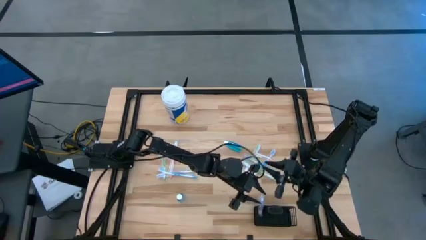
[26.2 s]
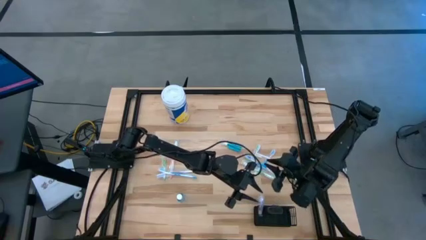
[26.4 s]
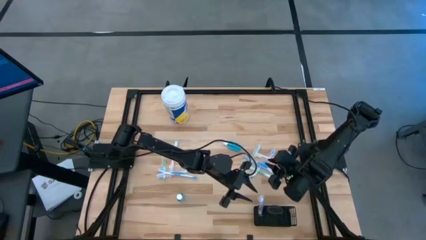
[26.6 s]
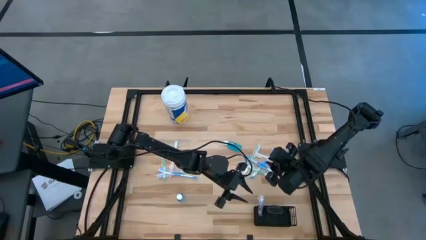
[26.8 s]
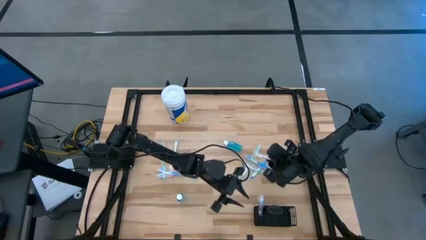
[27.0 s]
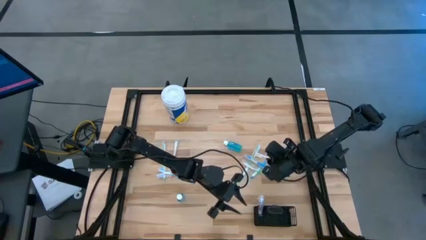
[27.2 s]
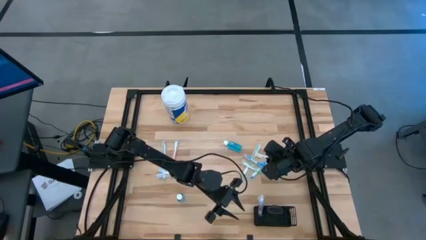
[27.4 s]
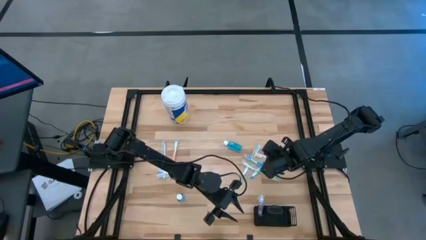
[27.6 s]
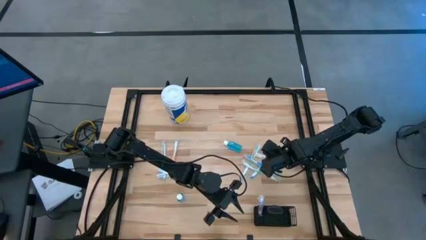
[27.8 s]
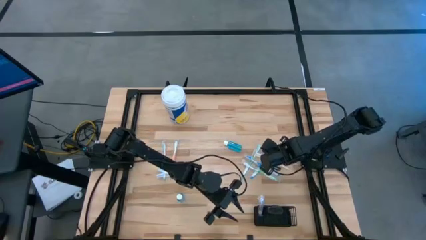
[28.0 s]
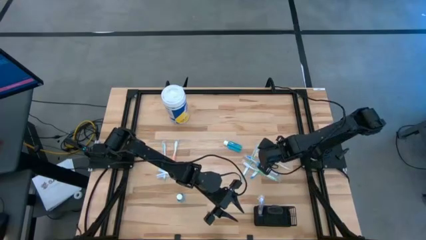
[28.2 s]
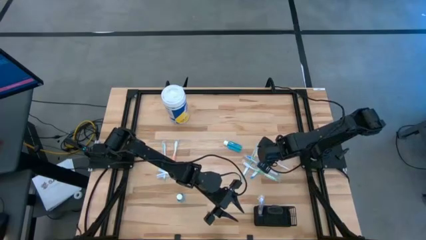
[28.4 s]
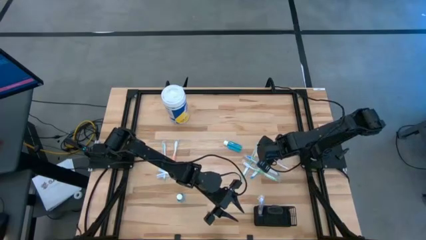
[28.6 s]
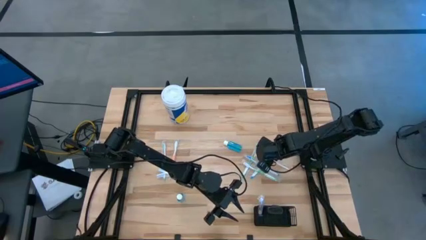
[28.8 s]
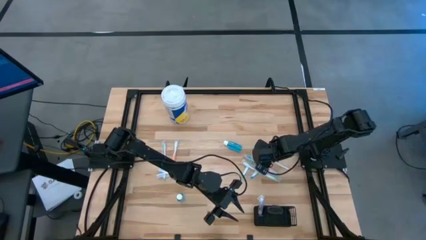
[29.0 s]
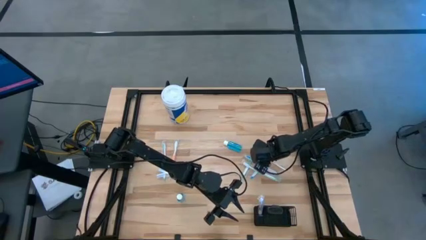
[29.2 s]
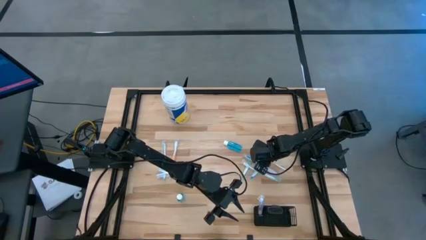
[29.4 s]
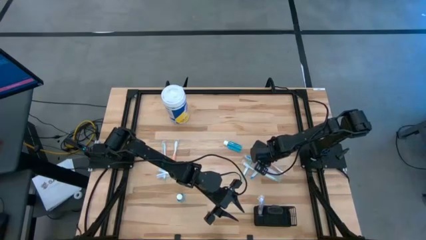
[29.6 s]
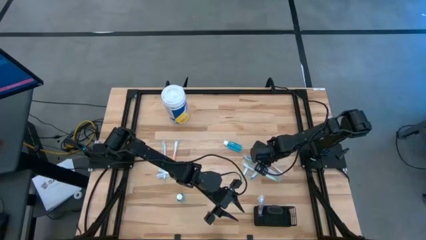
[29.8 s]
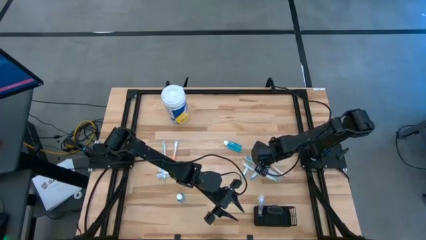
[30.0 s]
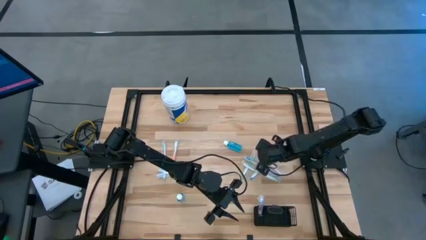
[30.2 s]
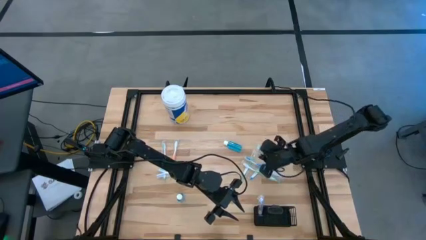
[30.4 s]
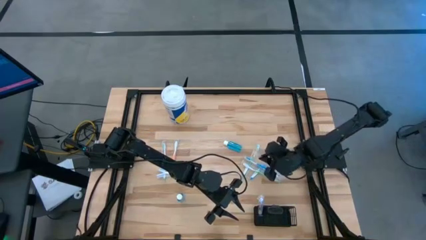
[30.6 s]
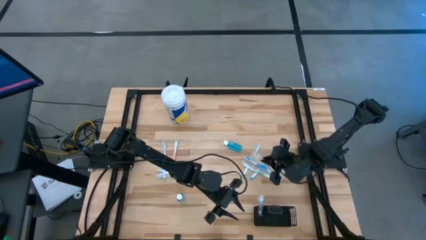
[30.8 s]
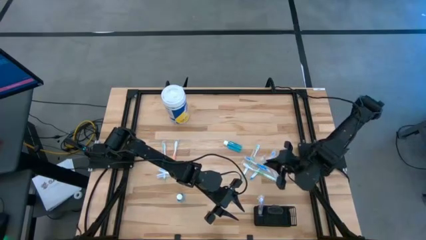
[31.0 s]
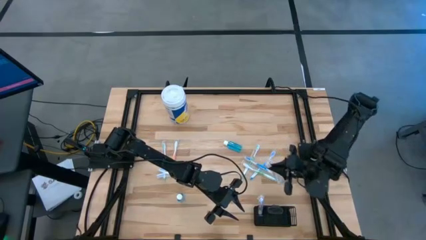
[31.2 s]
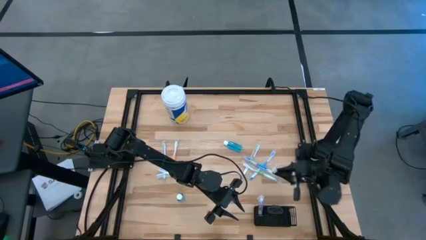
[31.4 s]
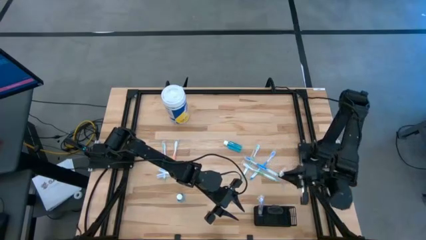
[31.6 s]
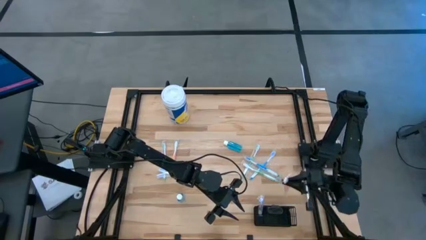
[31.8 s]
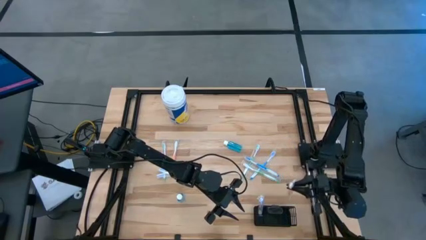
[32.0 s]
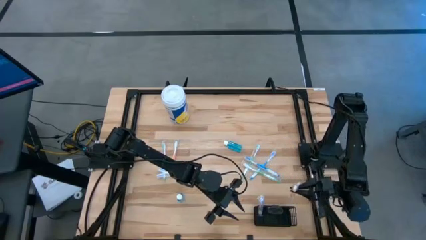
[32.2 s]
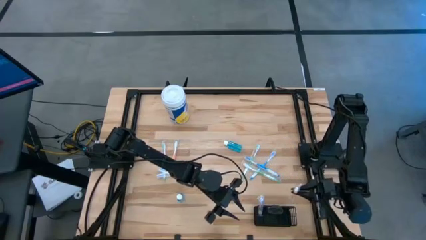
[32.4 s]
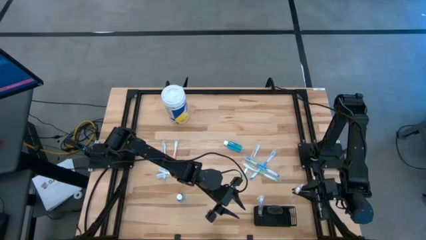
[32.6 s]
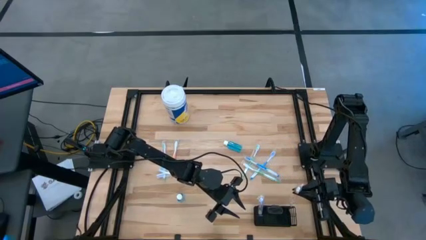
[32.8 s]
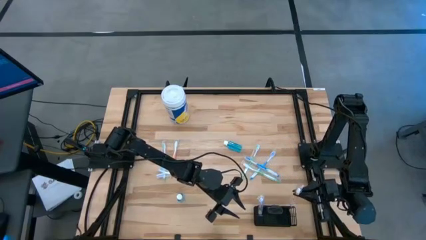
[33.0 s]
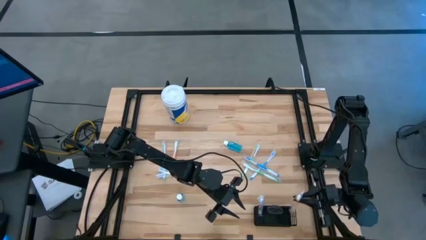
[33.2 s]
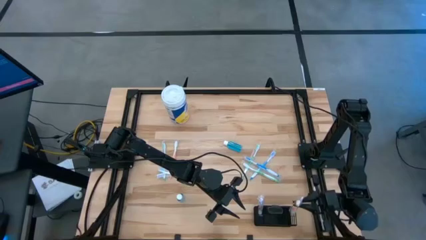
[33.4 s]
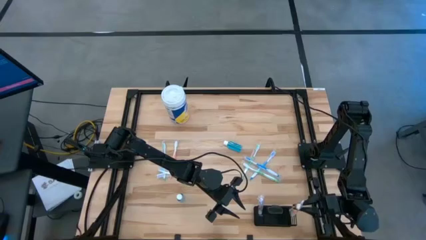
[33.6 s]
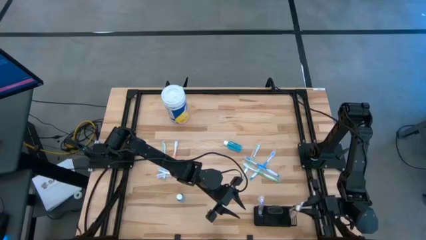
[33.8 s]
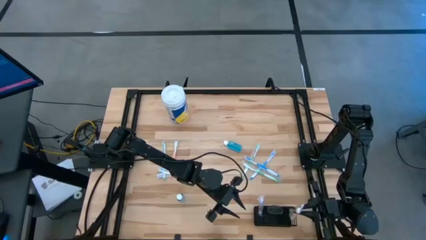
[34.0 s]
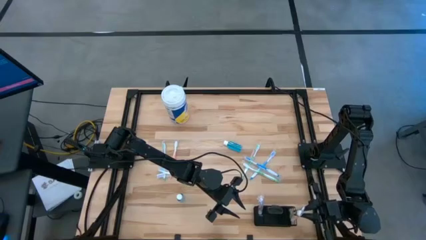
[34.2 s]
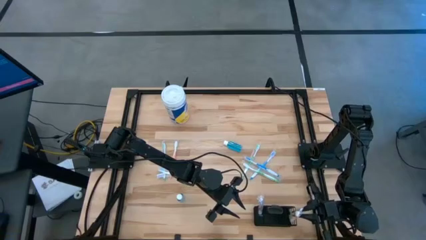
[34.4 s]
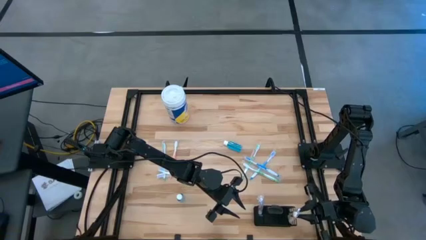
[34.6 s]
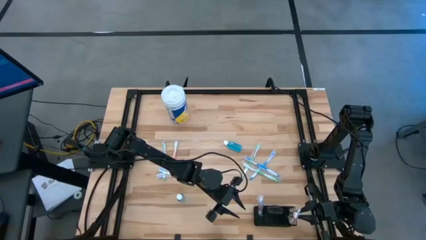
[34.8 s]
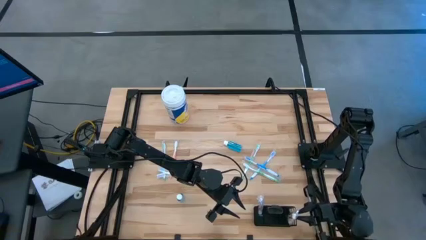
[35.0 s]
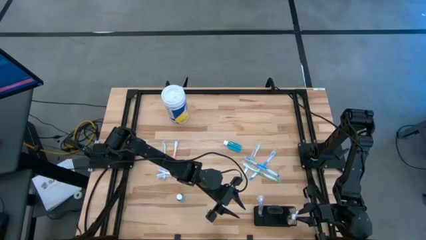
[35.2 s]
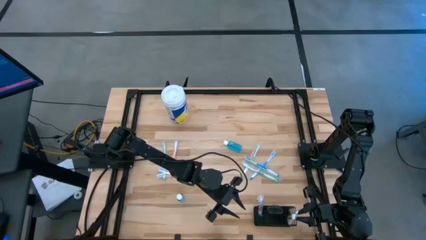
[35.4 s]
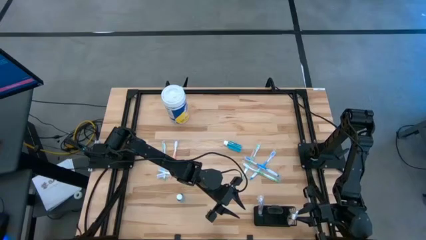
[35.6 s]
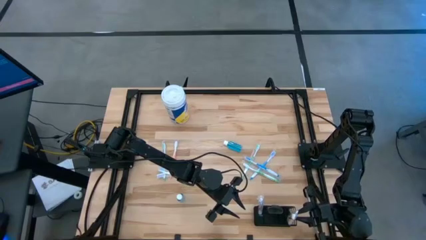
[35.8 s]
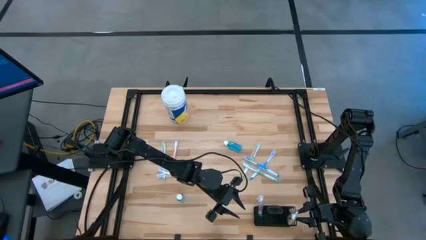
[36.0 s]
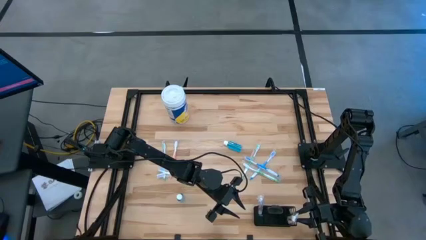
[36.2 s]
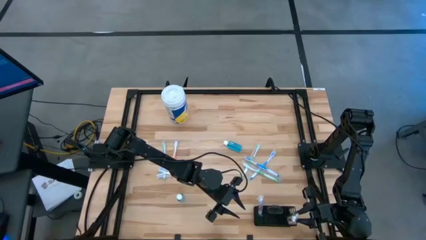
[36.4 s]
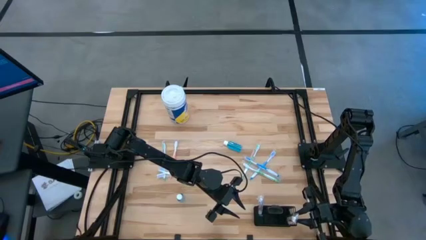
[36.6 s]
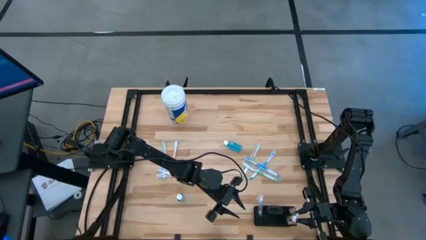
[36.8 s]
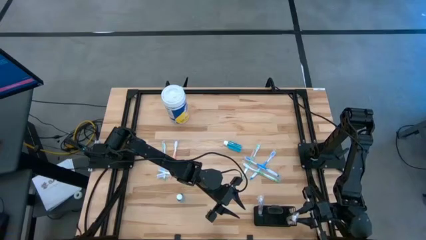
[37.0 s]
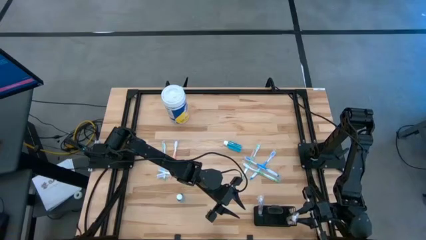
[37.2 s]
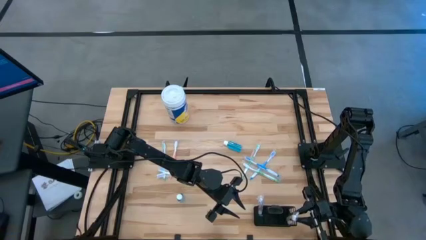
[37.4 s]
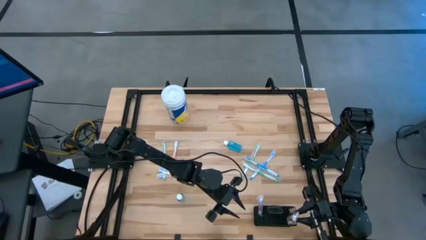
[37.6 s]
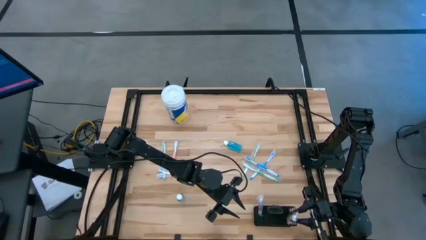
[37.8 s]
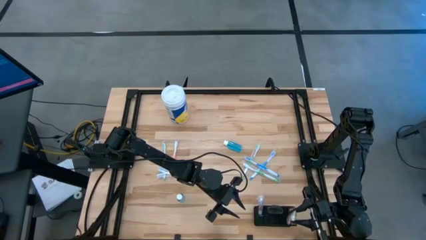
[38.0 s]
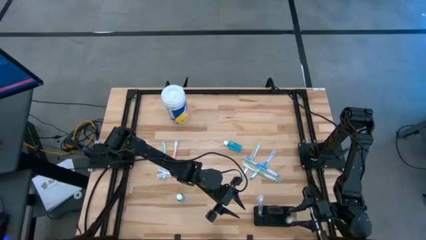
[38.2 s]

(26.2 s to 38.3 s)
Task: Pick & Place toothbrushing station
Put the right orange toothbrush into the wire organizer

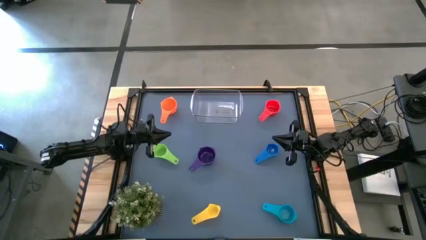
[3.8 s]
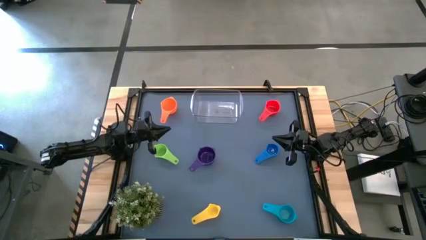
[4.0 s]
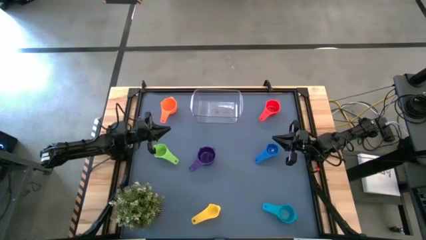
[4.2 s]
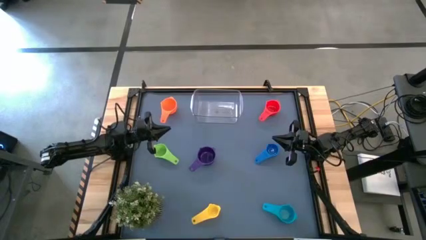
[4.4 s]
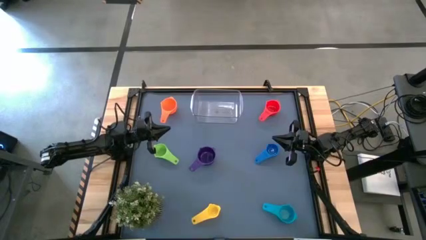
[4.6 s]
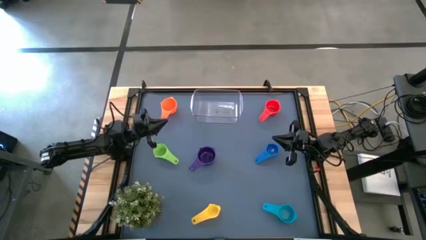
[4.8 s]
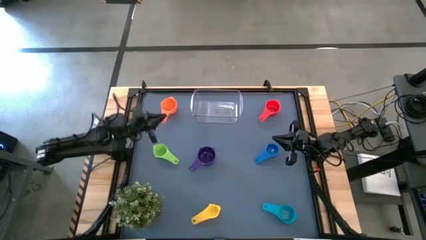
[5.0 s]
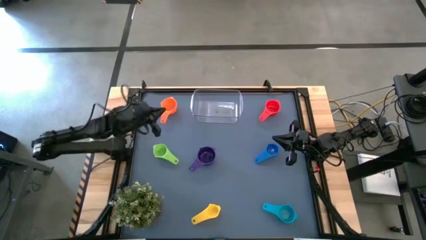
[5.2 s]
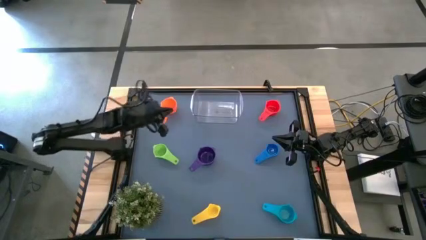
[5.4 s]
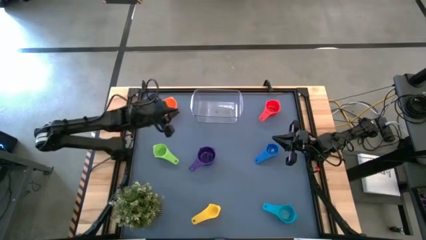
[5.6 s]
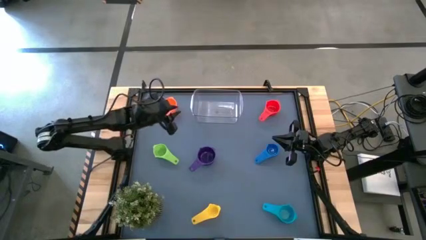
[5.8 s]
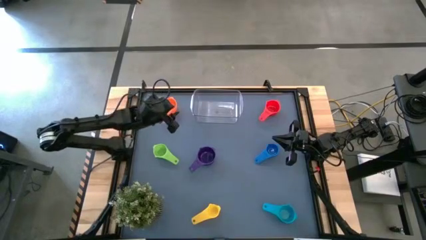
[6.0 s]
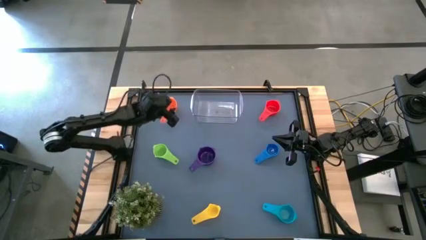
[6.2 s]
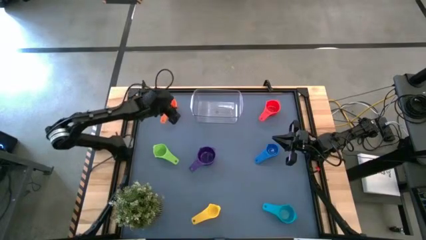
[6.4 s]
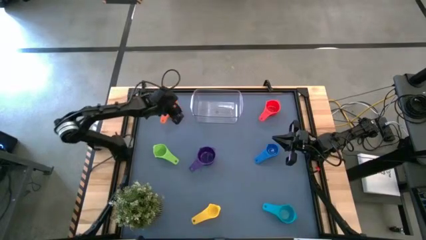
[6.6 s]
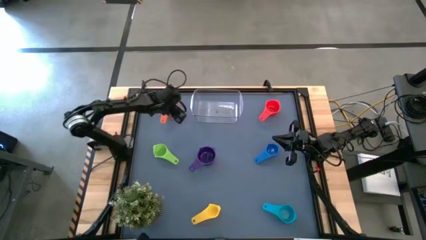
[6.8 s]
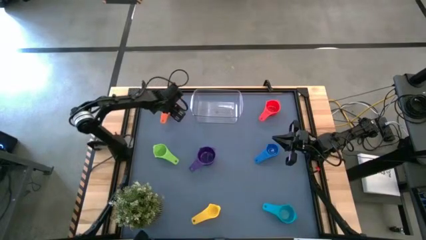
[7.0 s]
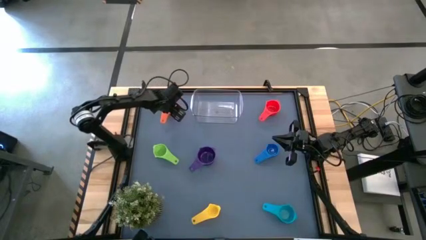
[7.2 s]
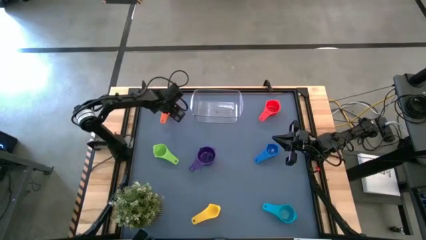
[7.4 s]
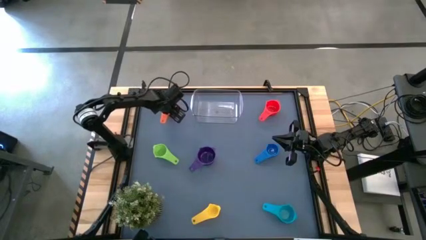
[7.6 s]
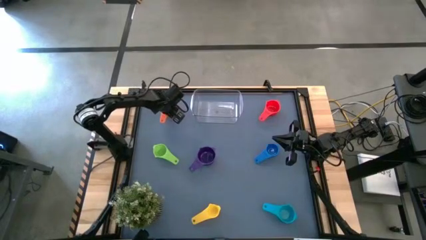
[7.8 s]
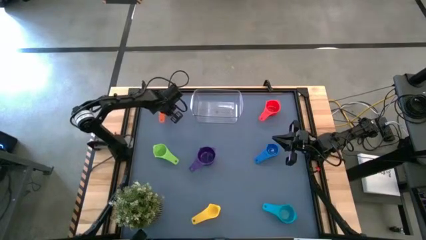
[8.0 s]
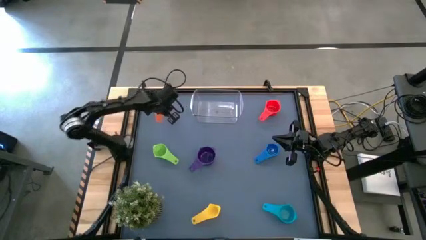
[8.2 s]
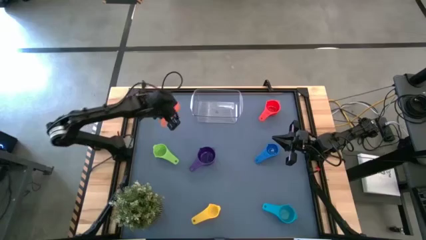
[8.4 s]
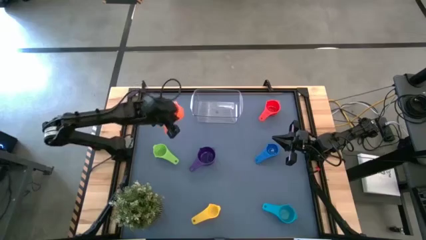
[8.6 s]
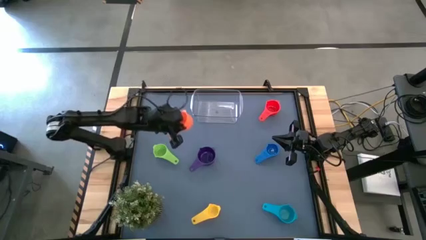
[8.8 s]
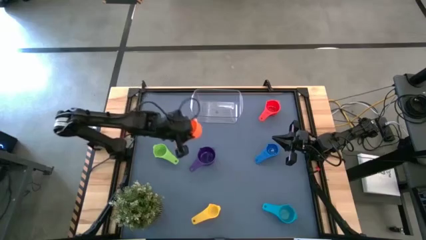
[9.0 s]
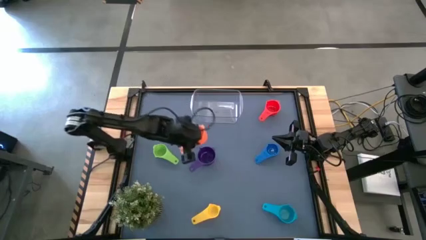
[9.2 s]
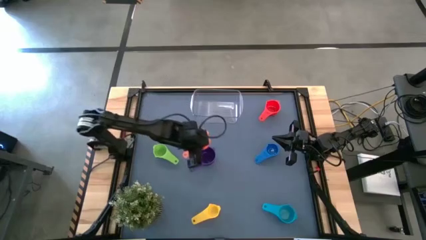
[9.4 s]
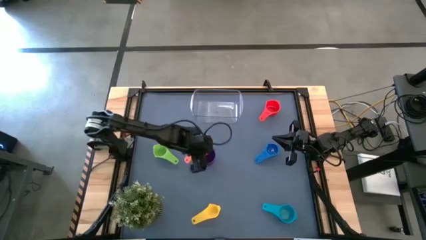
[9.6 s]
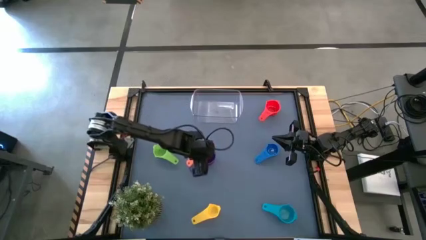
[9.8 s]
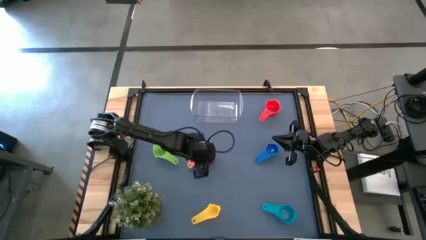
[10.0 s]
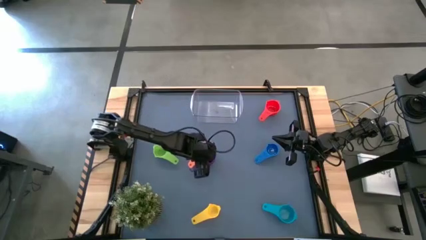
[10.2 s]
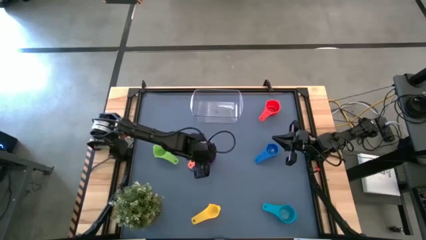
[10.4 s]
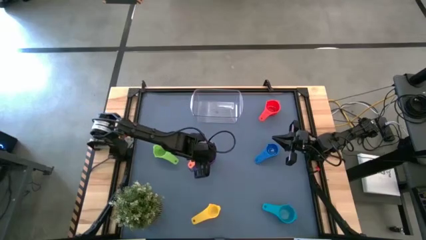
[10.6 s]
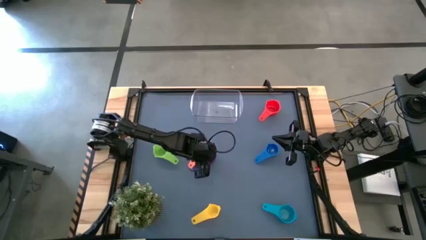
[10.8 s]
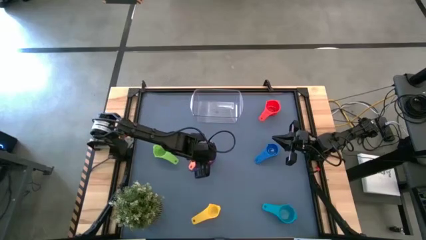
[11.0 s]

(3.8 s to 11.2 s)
Task: Nest measuring cups in basket
Stack the orange measuring cup on top of the purple measuring cup
